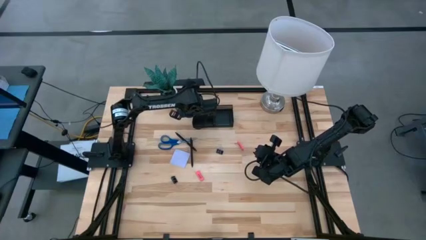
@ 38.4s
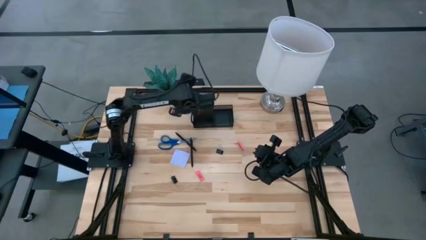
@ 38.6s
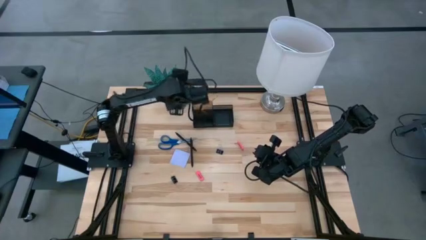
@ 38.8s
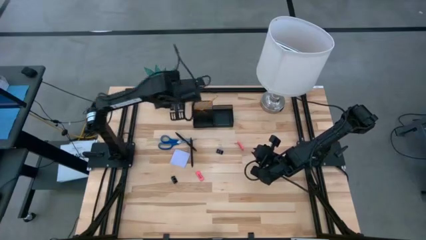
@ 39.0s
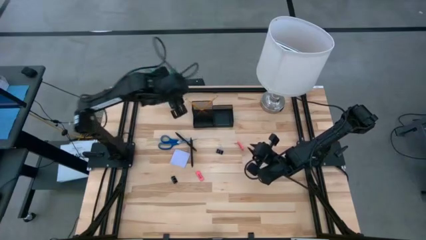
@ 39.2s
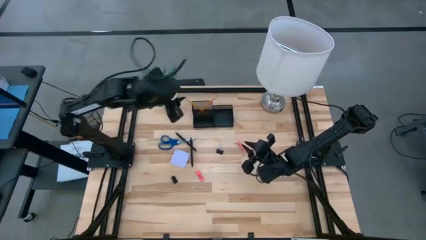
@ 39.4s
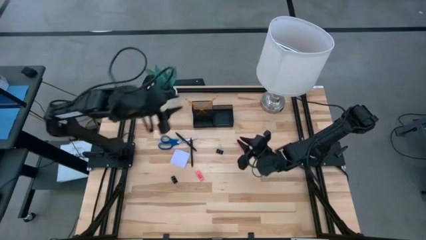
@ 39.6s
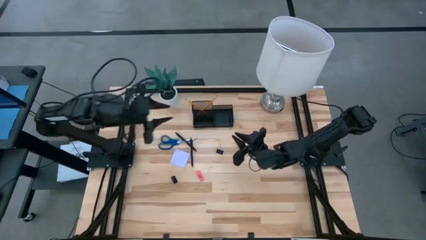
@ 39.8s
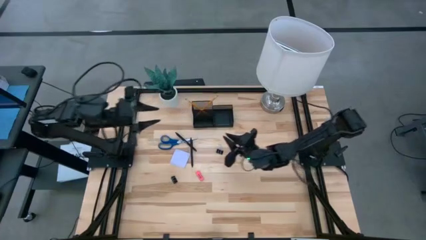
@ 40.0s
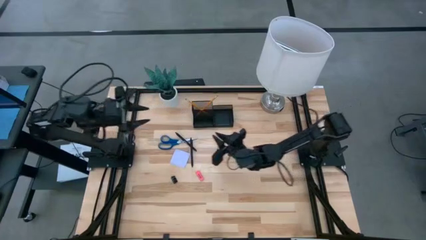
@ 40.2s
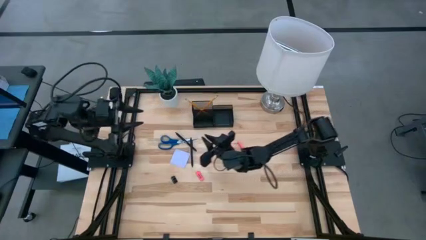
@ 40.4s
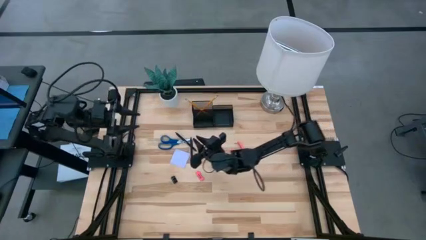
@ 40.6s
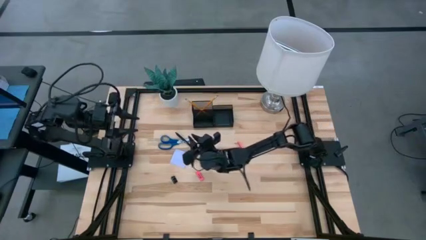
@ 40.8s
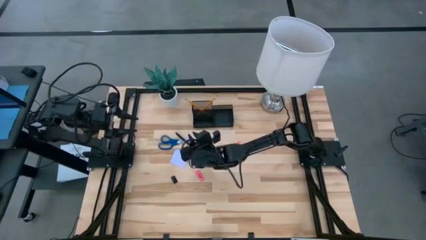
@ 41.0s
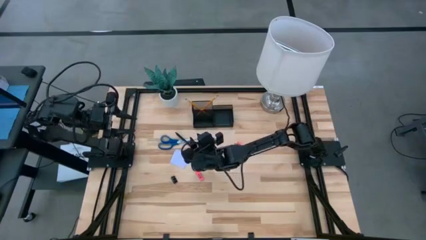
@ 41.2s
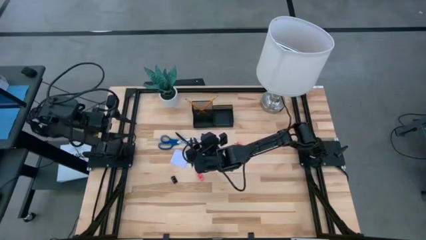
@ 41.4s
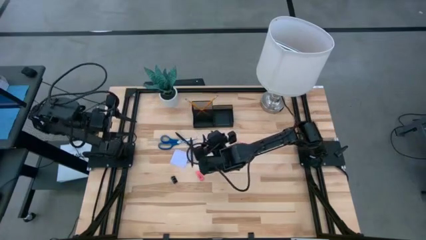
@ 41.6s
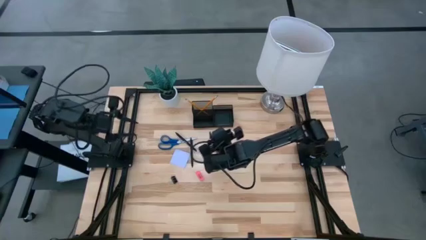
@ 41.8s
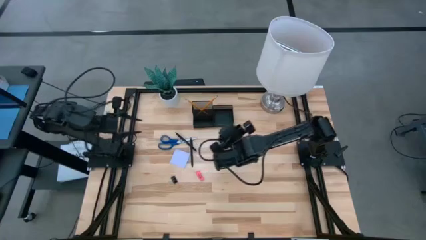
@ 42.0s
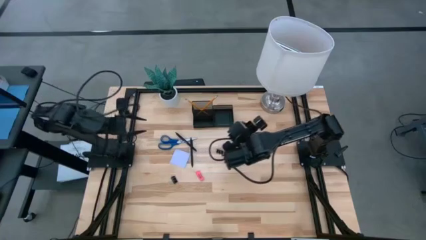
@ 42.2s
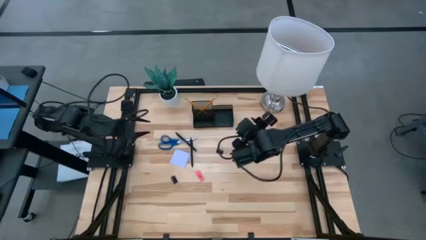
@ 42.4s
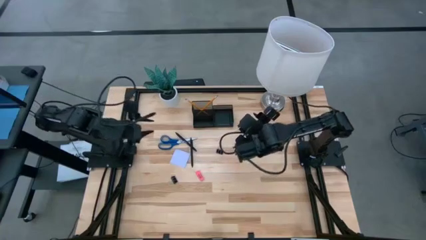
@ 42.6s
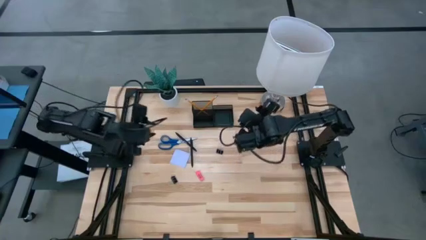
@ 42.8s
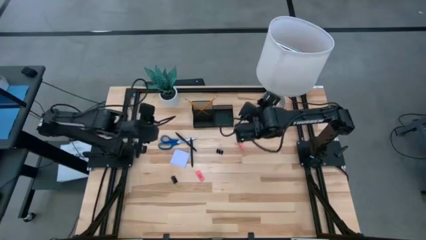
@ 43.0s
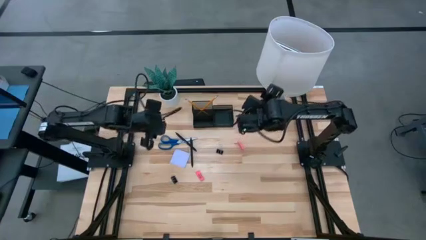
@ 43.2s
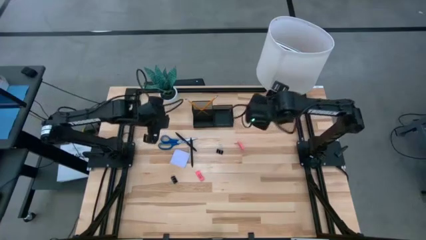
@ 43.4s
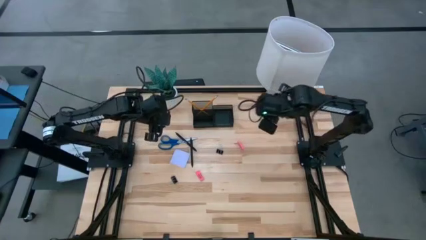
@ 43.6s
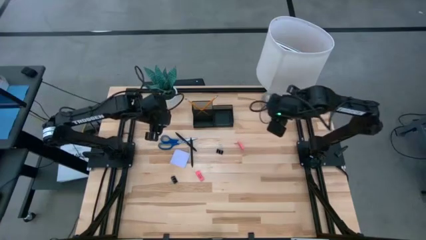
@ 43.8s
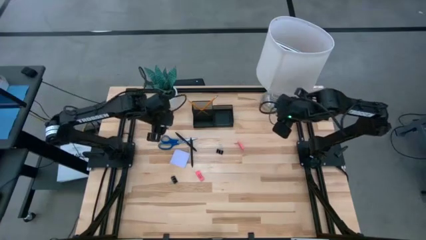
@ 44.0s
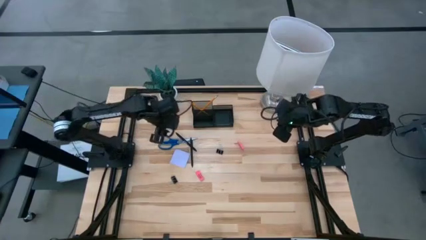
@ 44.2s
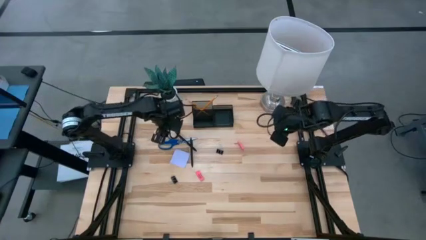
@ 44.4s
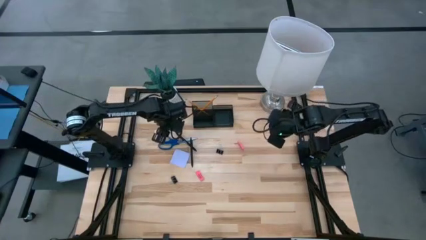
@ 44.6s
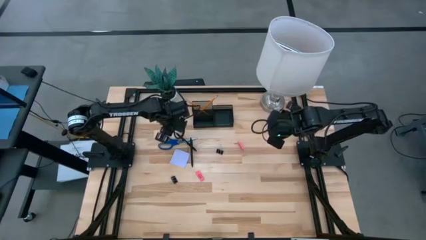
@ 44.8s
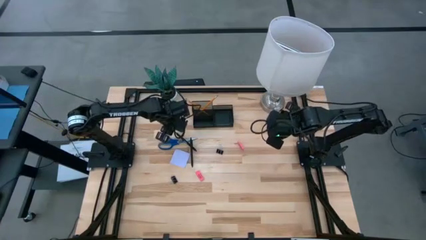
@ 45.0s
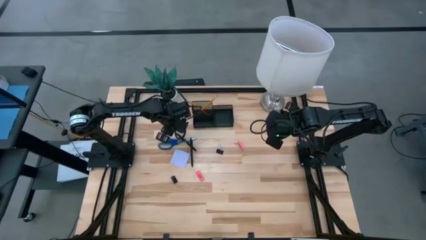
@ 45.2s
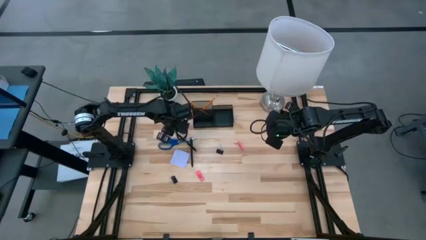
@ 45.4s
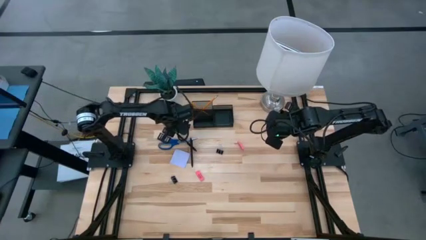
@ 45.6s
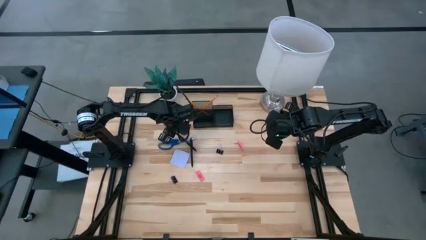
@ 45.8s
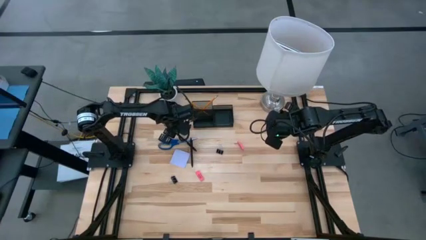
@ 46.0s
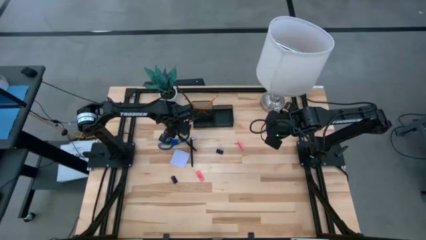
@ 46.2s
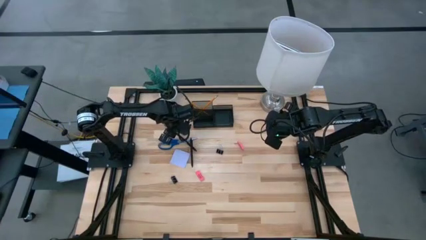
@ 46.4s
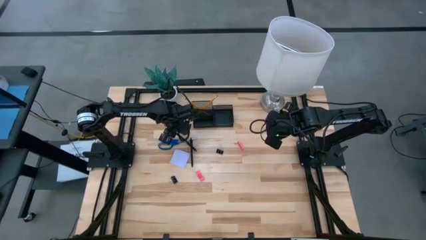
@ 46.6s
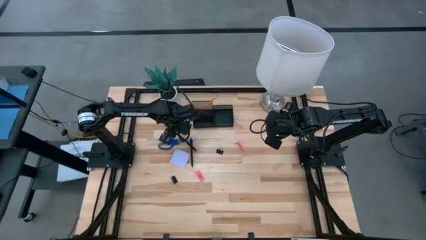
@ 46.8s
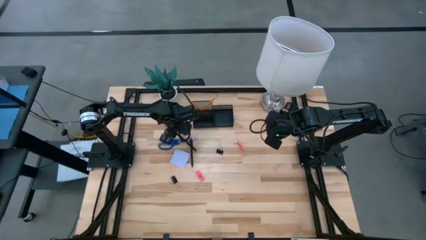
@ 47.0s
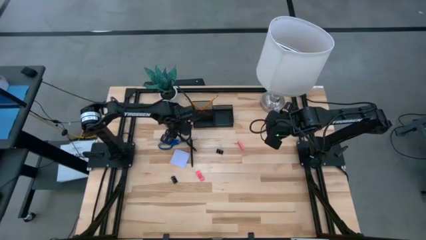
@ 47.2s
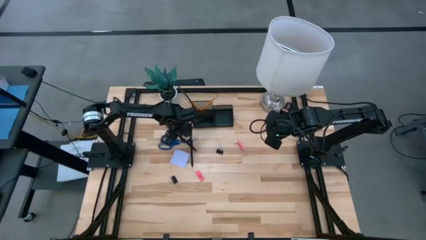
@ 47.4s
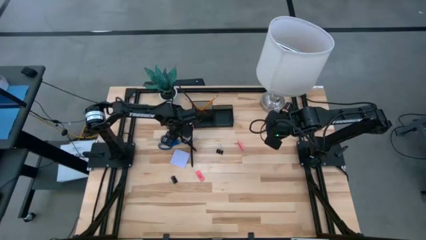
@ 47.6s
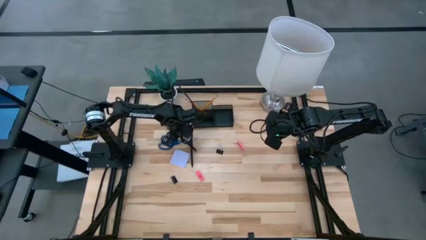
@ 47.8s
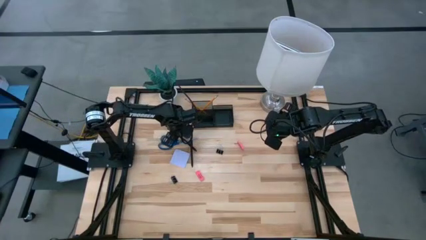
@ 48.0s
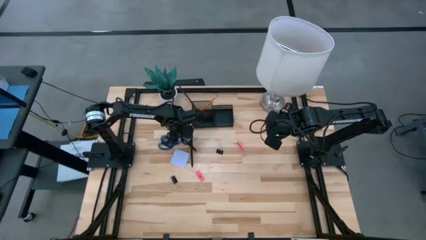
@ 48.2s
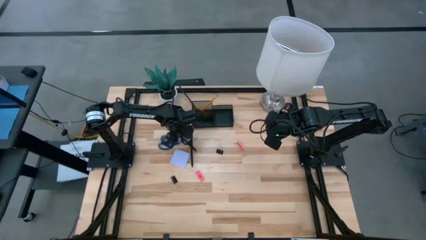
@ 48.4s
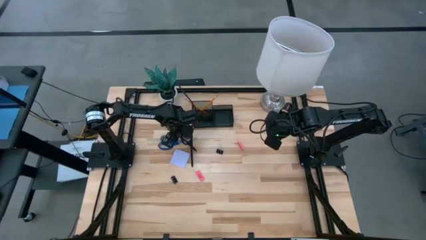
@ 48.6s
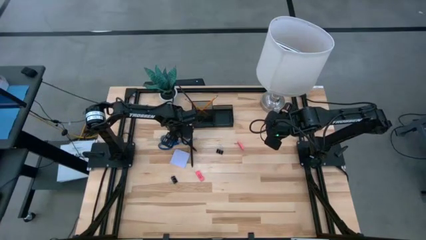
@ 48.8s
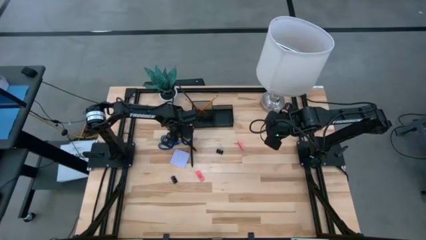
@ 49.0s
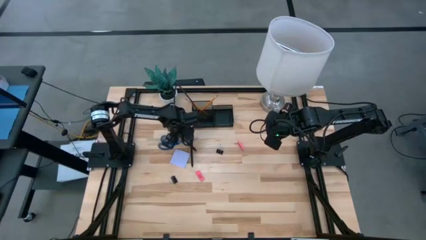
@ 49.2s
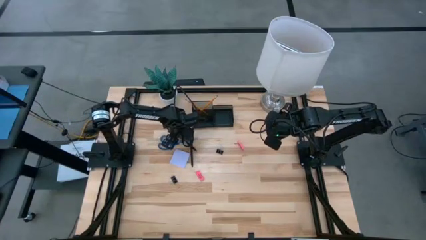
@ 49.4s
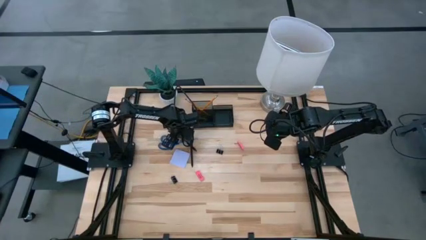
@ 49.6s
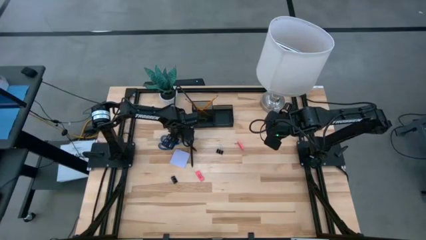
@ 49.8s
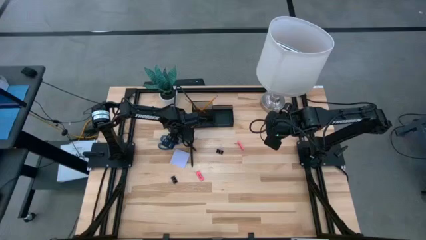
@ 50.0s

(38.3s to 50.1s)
Task: Pick and place office supplies into organizer
Put the top black ball pen into the desk organizer

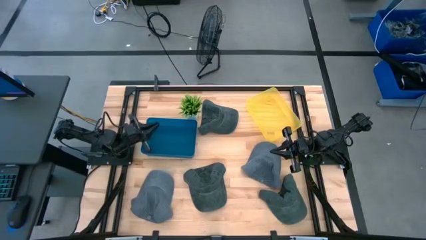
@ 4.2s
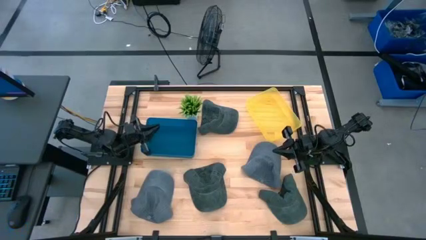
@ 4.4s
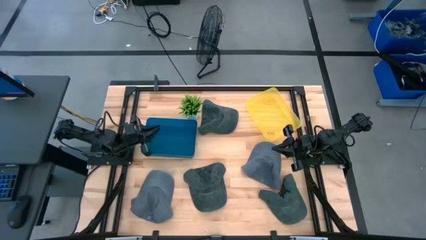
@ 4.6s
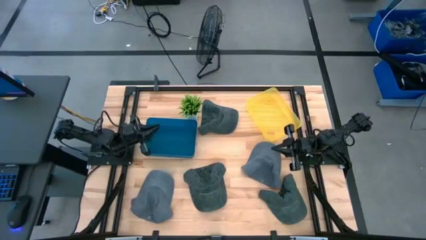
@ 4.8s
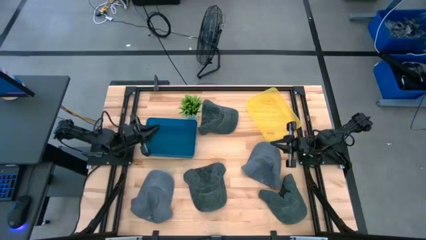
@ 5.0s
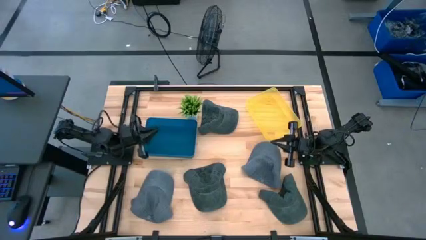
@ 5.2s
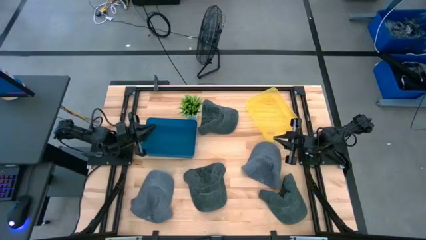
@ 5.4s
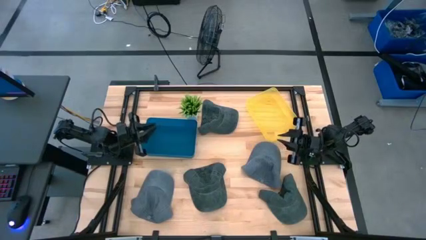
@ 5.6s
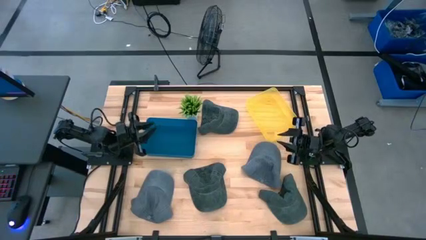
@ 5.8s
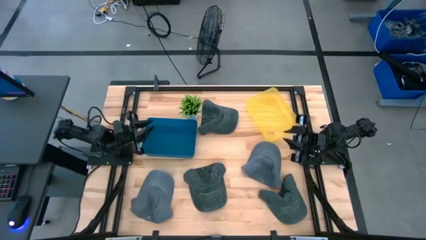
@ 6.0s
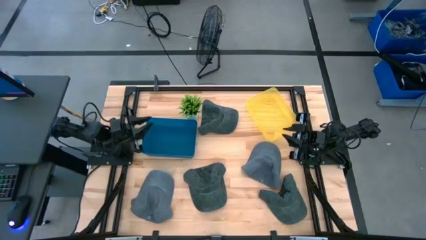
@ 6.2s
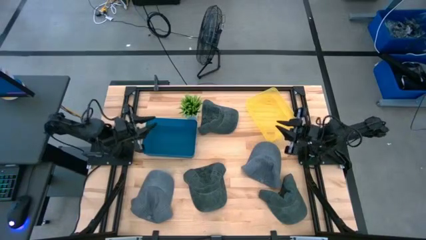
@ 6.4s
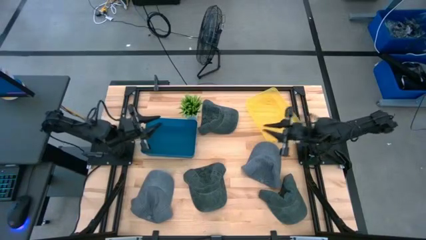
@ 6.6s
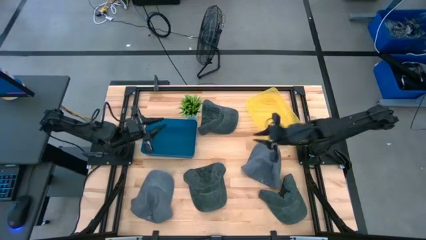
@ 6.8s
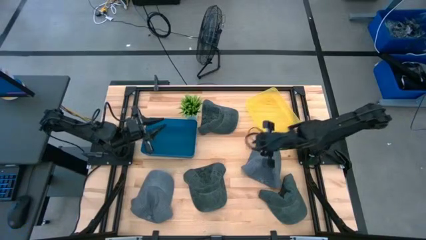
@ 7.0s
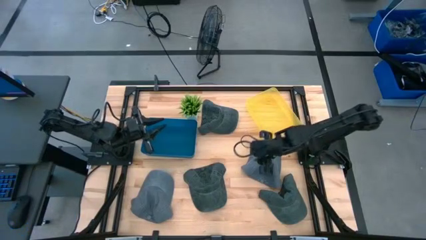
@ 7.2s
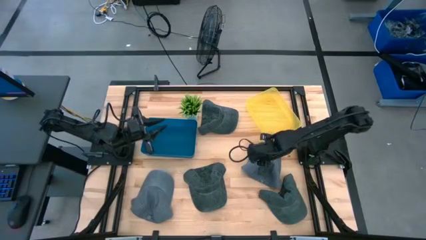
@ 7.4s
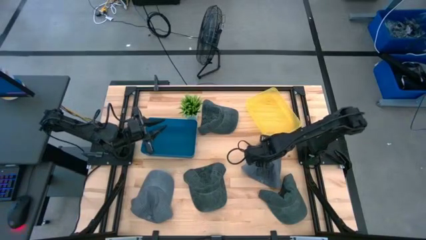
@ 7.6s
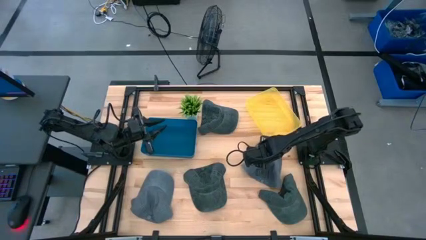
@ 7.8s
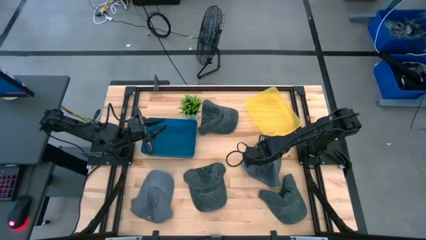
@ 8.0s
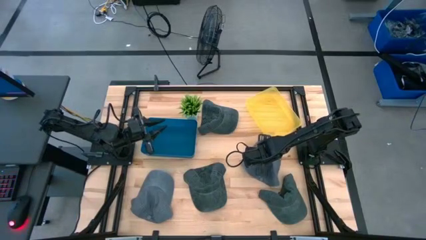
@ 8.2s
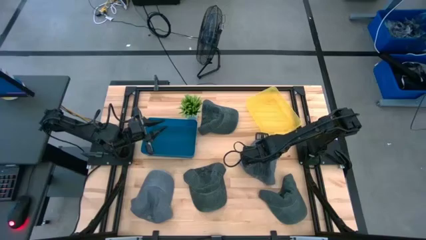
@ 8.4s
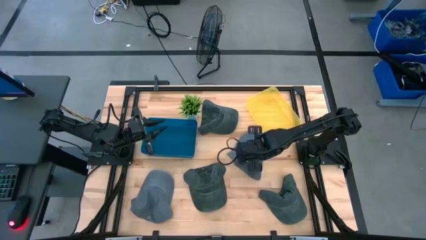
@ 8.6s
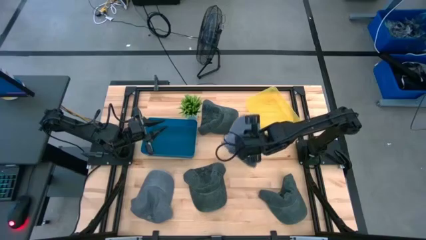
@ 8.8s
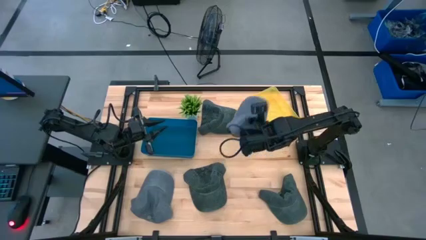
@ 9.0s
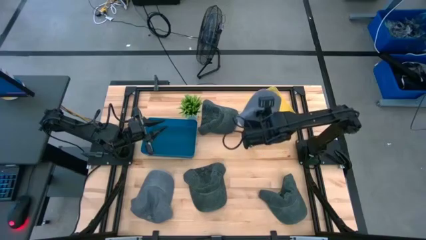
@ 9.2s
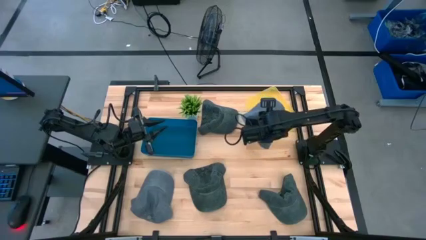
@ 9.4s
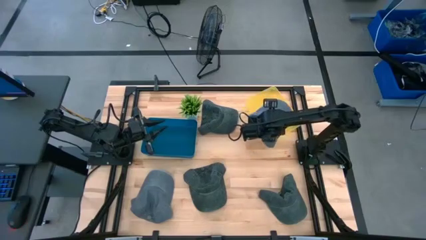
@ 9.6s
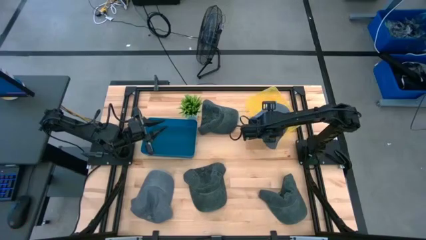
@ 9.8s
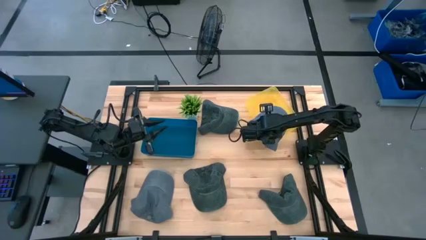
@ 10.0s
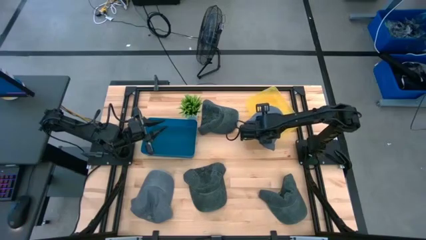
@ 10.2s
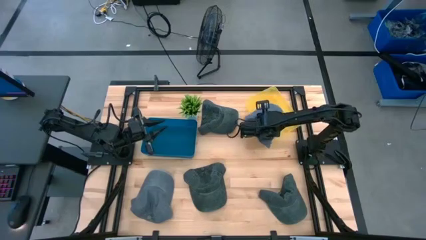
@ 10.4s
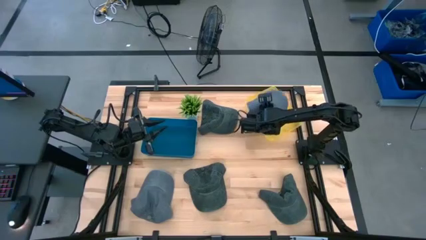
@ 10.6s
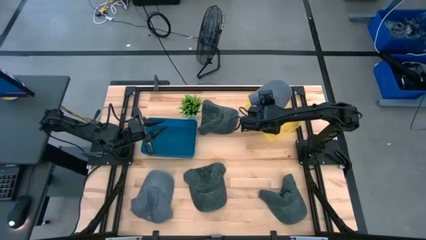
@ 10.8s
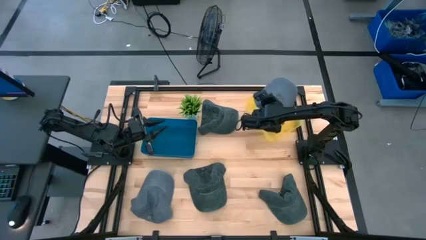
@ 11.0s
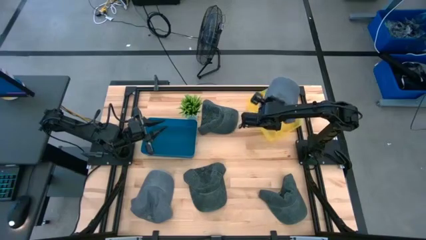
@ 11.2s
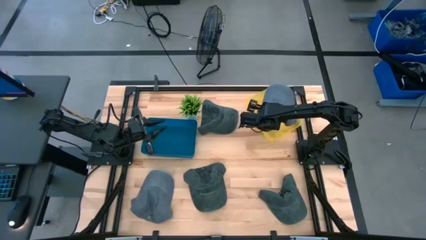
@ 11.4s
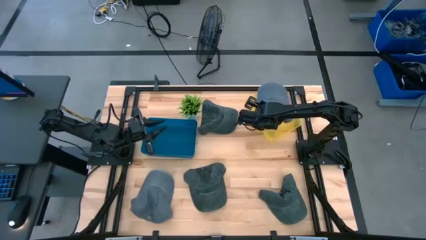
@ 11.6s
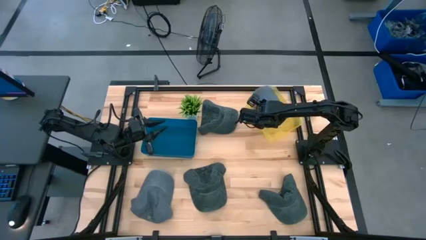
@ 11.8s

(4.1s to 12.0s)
Task: Pick & Place hat
Put the right gray cap into the yellow bin
